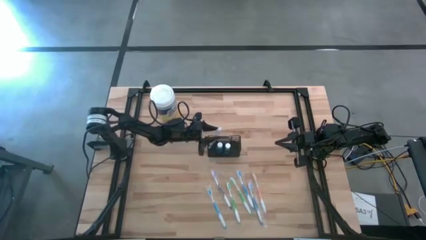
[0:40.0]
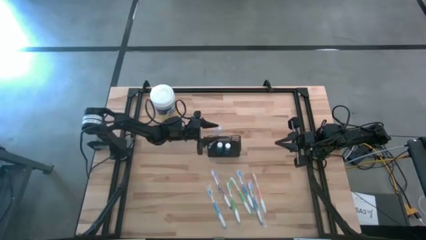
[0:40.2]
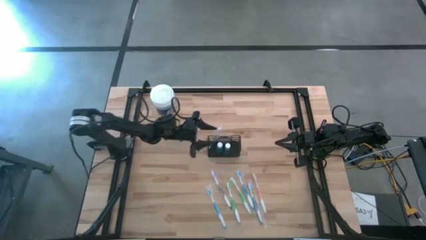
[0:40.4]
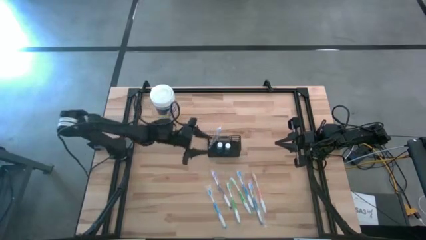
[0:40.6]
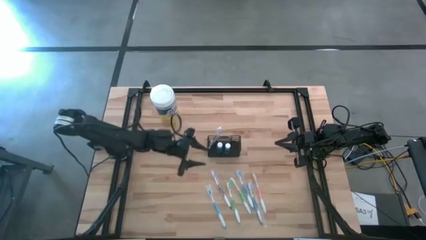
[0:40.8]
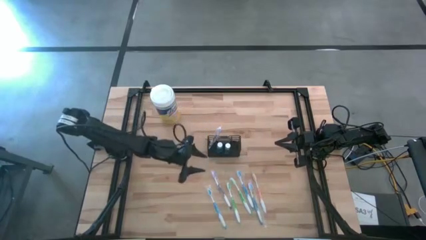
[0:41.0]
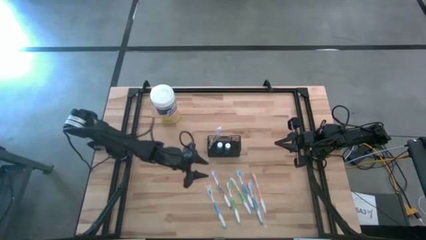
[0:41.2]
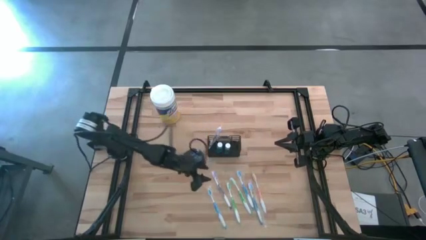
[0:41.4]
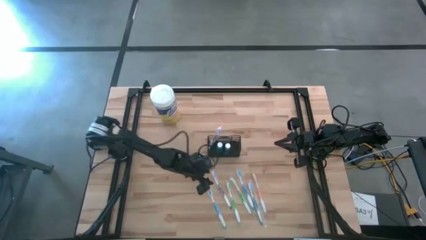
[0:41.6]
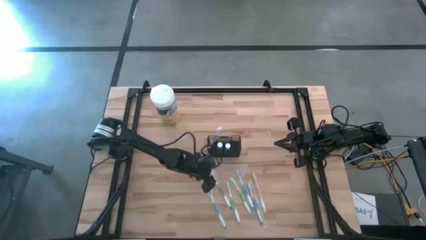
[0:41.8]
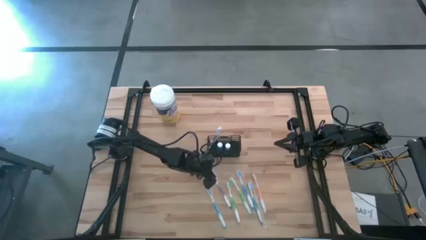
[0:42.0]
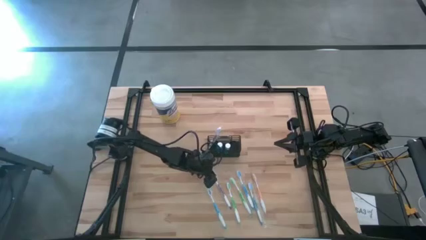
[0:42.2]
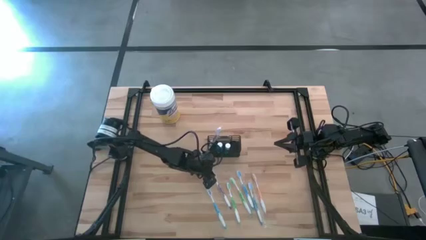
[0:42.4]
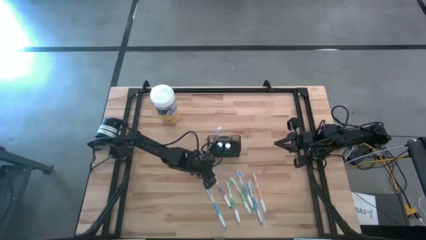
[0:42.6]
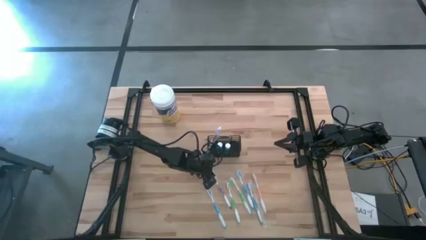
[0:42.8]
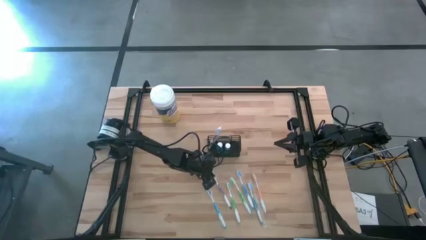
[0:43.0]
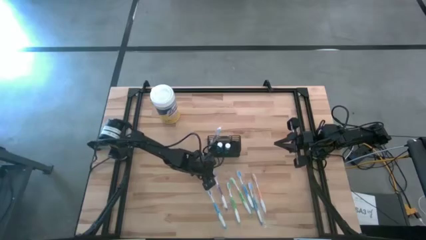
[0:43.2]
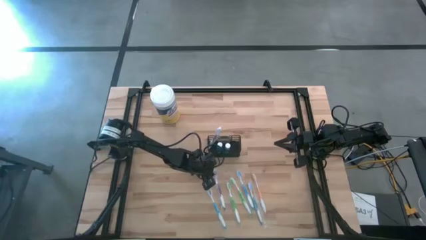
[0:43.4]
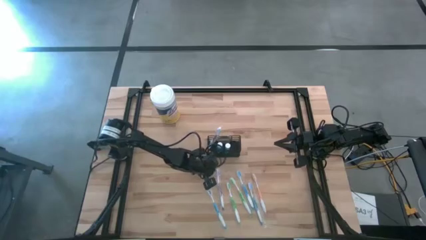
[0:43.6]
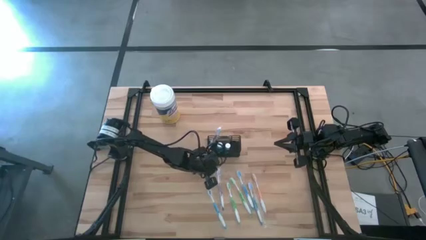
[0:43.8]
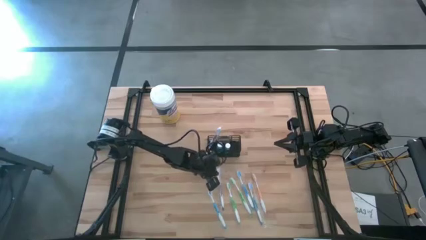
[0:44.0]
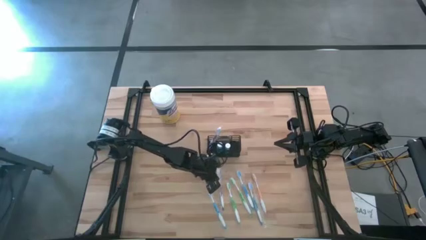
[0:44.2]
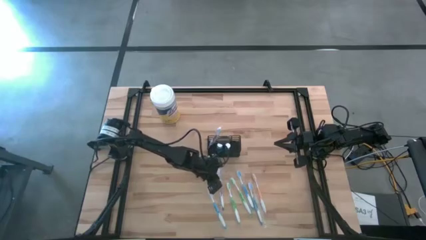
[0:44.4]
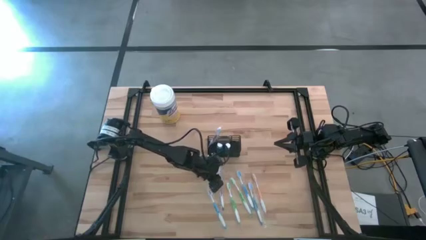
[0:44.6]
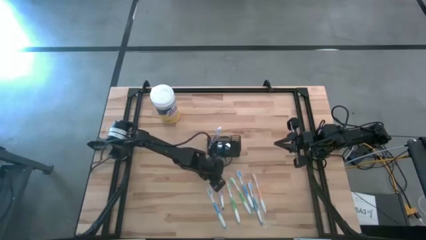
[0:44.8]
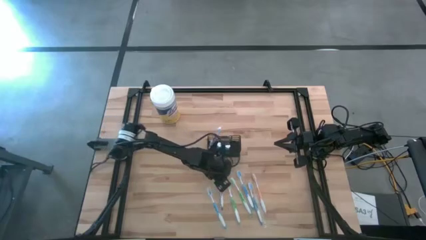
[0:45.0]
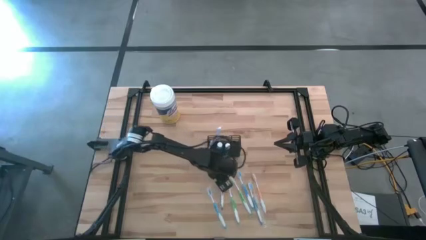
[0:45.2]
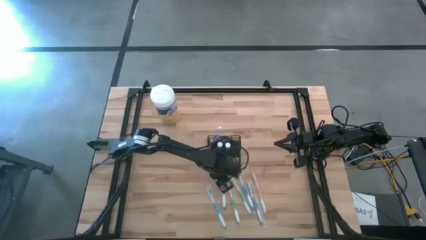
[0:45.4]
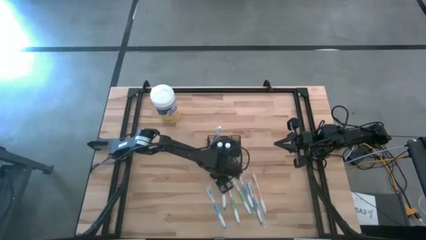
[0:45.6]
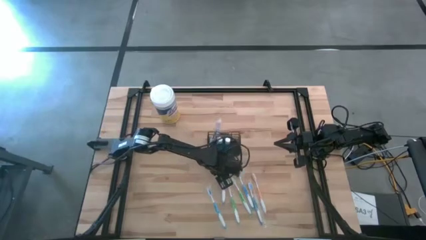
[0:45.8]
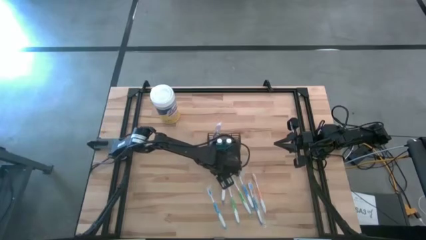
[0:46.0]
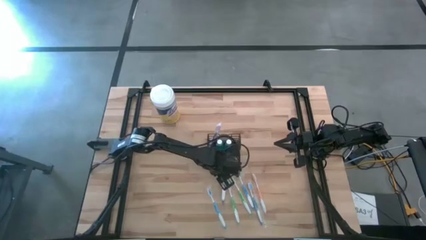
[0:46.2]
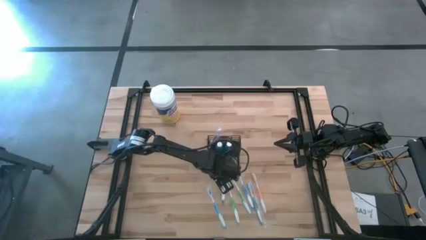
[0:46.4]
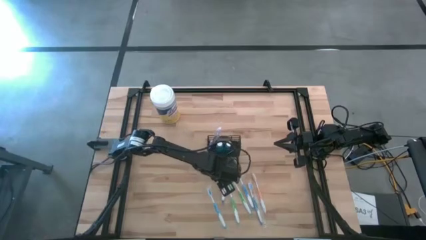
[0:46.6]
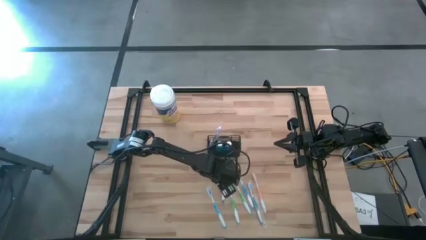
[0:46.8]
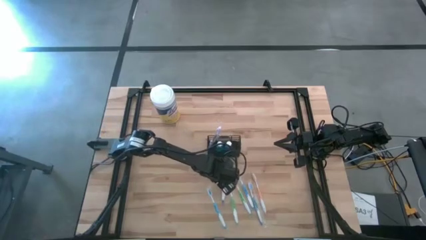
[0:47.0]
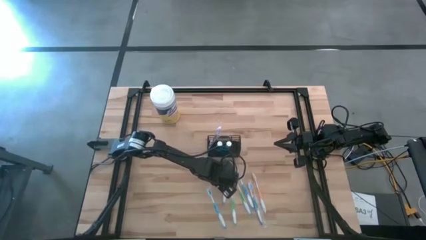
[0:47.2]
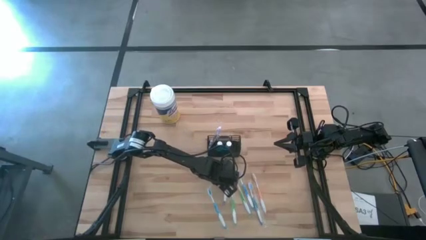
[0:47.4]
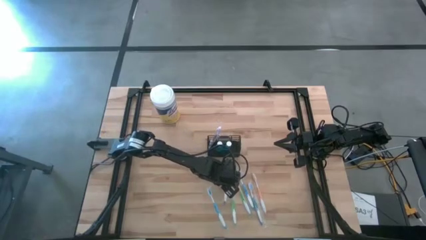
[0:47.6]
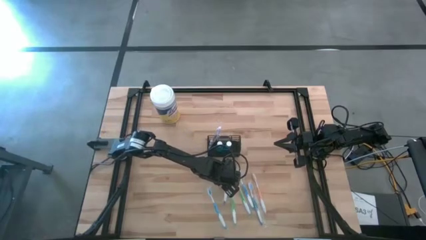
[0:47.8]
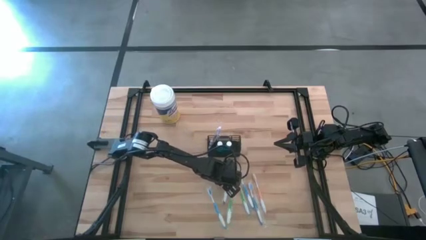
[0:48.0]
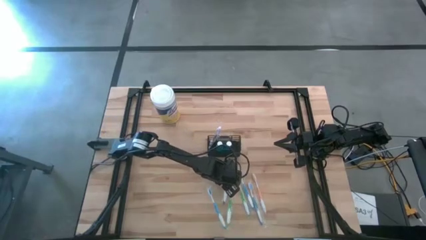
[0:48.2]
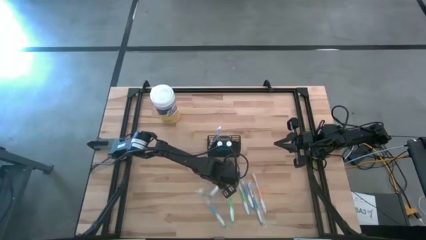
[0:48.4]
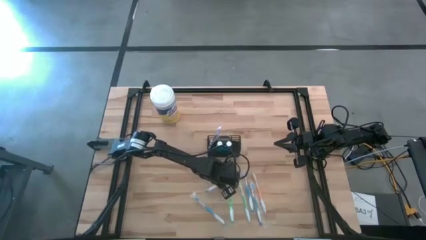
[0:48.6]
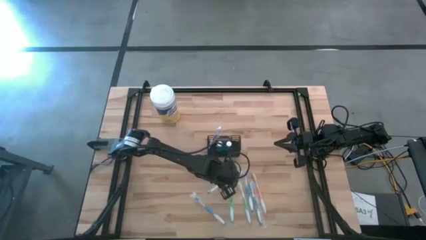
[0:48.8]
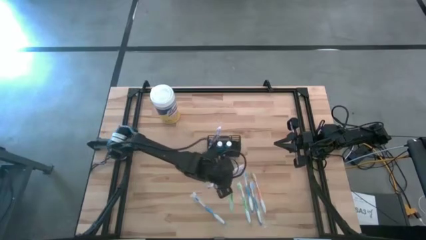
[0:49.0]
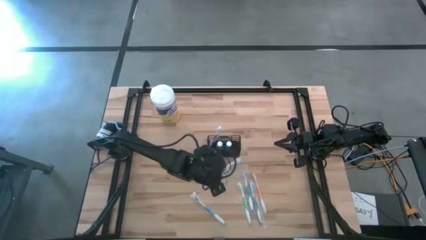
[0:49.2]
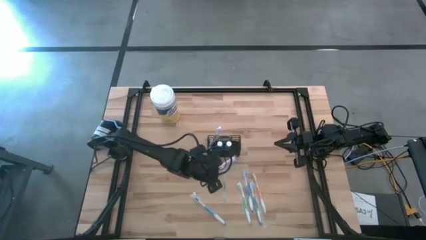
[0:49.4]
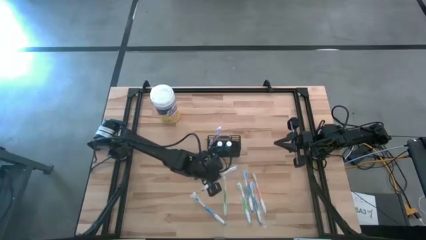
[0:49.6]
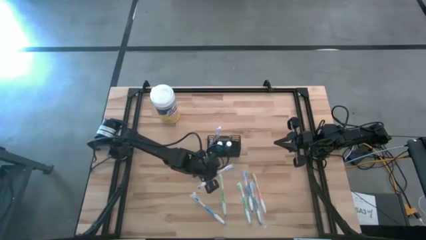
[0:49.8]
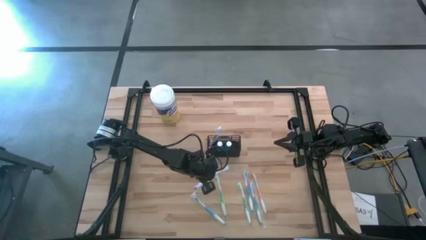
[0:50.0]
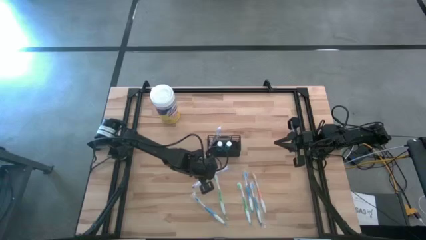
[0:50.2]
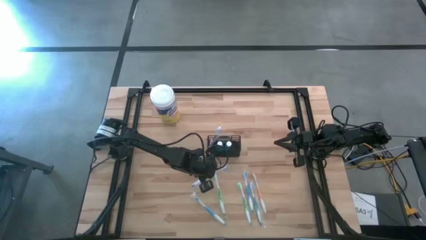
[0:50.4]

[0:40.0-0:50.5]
Task: Pick & Place toothbrushing station
Put the purple toothbrush into the wire organizer

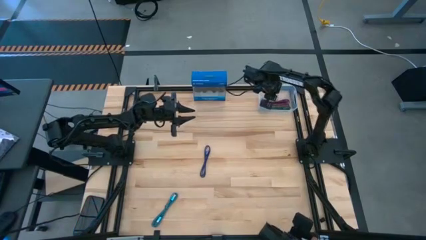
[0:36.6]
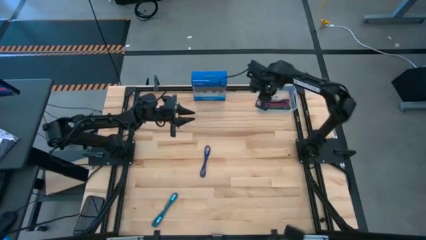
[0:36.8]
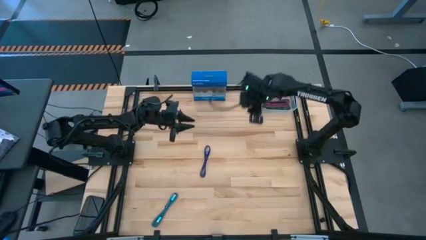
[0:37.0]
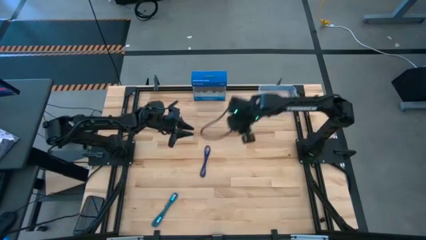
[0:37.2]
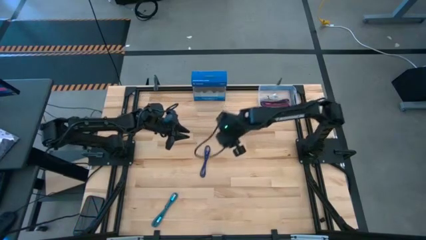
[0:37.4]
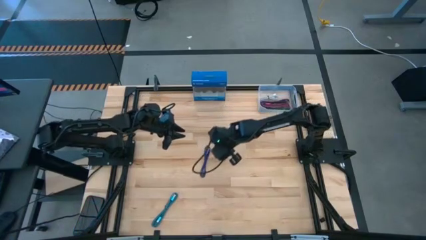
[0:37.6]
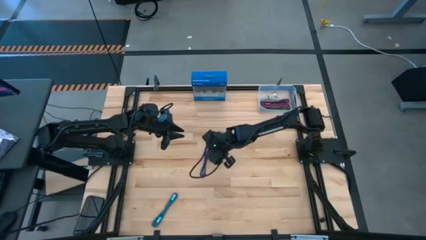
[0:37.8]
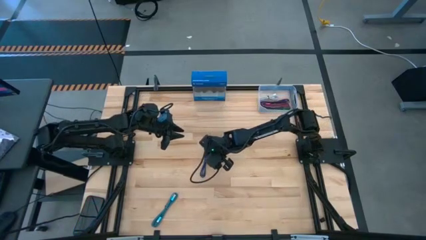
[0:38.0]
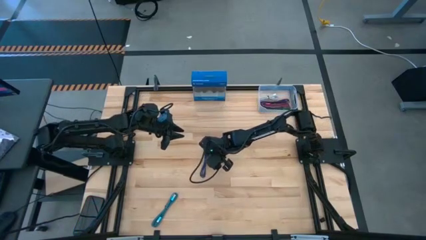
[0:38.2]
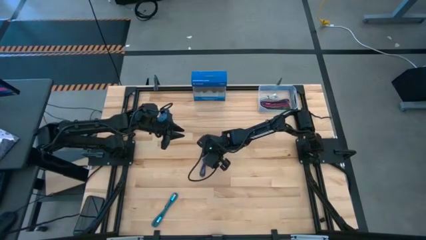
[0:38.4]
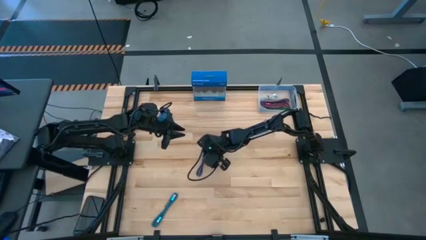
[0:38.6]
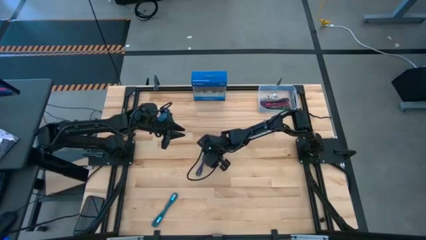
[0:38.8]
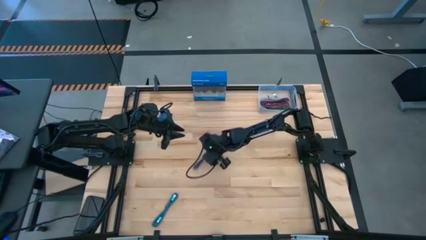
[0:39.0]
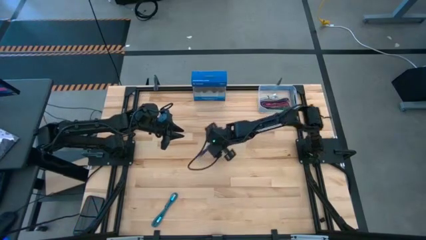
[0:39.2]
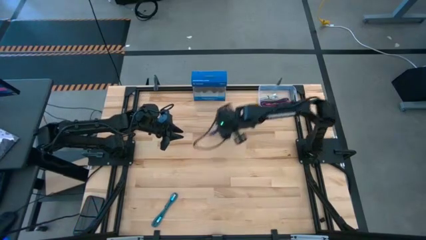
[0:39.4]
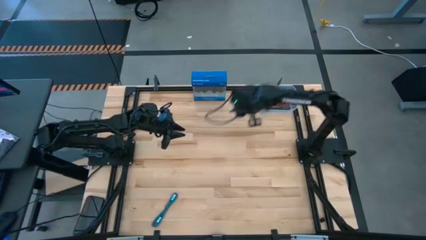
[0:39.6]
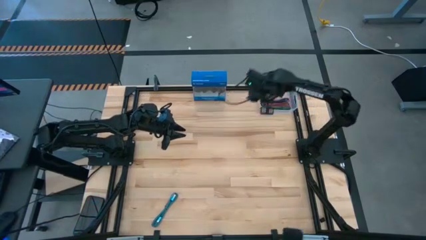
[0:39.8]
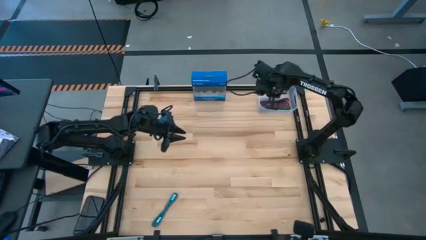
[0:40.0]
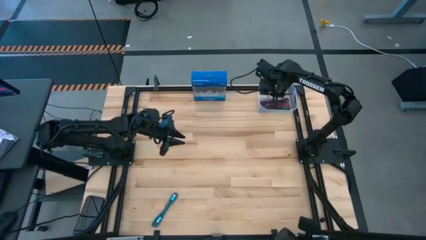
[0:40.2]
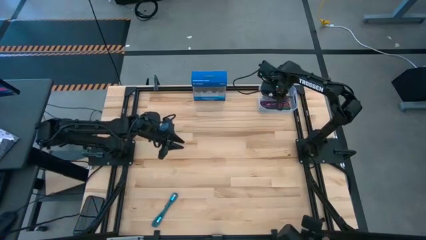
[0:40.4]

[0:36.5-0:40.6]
Task: Pick and place USB-C Cables
Put the blue charger cable into the bin
